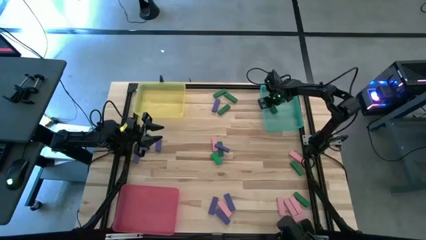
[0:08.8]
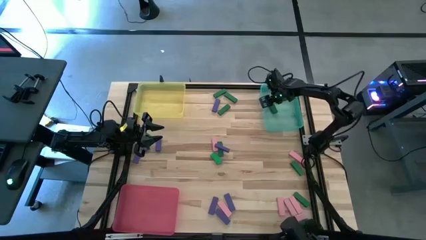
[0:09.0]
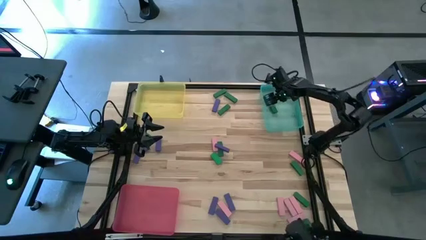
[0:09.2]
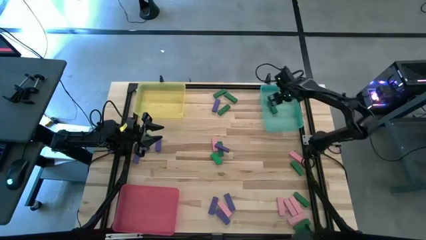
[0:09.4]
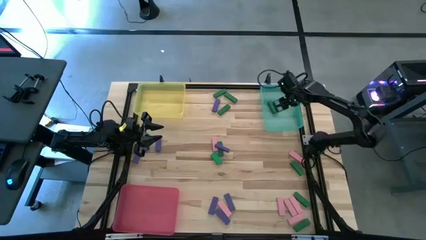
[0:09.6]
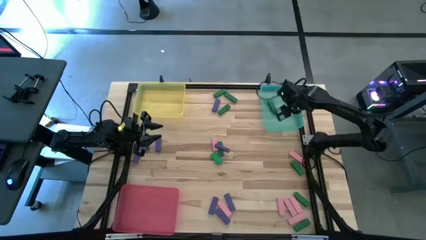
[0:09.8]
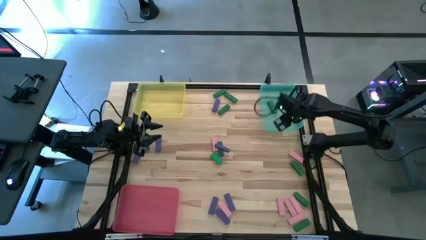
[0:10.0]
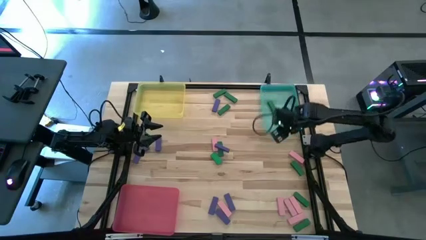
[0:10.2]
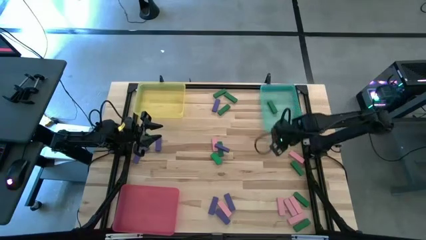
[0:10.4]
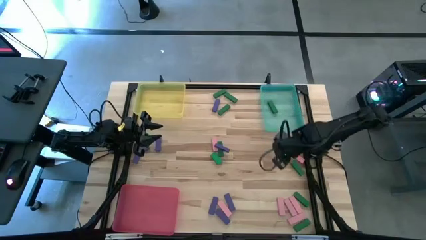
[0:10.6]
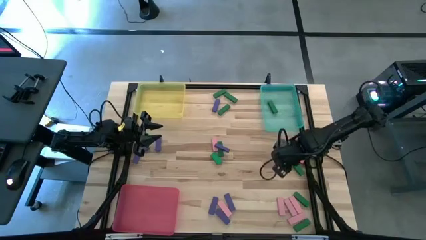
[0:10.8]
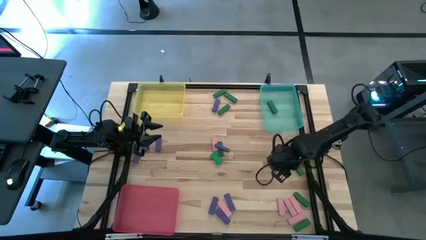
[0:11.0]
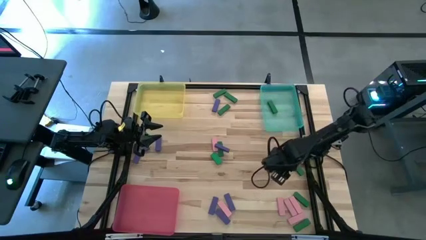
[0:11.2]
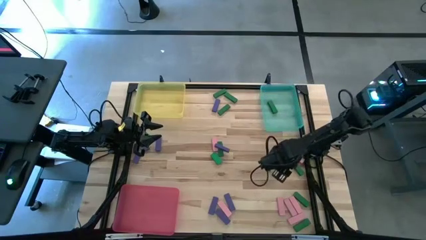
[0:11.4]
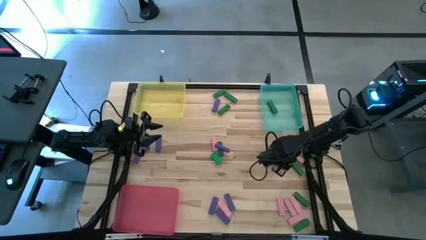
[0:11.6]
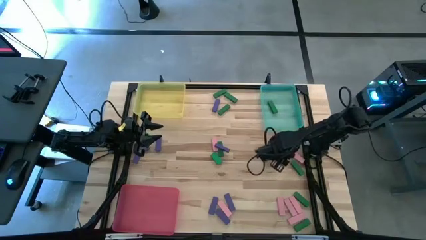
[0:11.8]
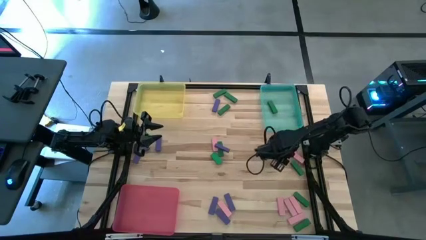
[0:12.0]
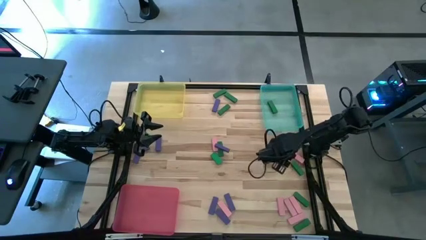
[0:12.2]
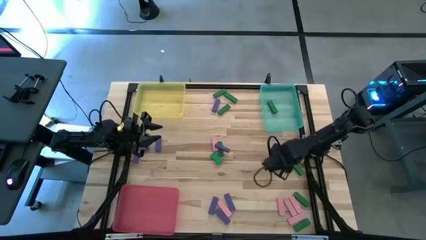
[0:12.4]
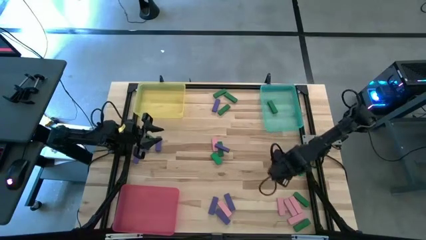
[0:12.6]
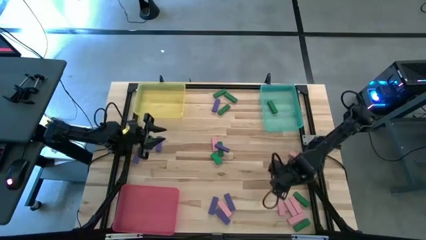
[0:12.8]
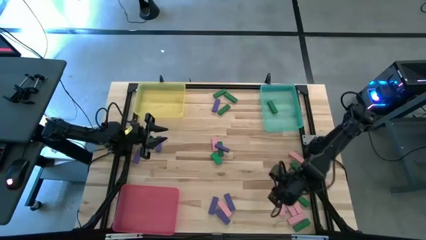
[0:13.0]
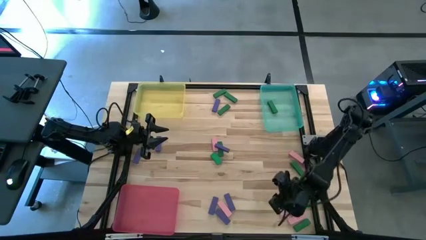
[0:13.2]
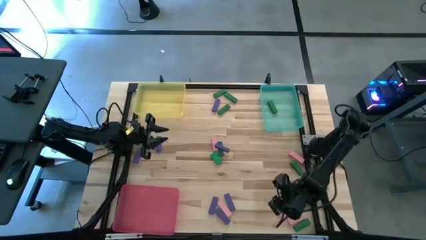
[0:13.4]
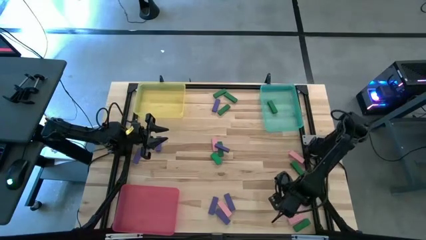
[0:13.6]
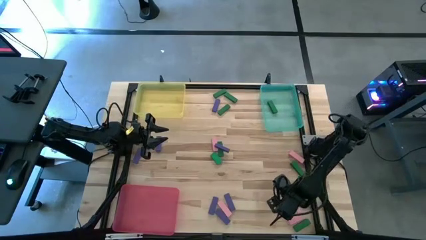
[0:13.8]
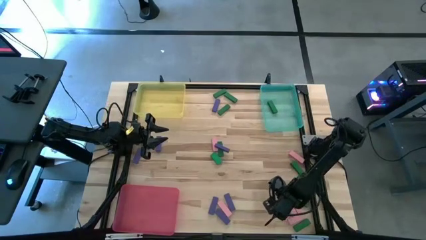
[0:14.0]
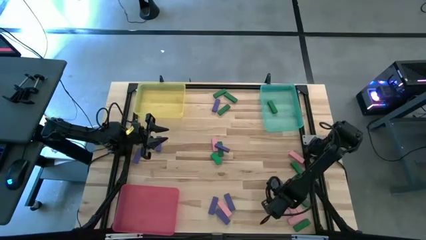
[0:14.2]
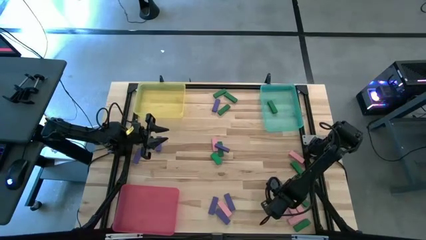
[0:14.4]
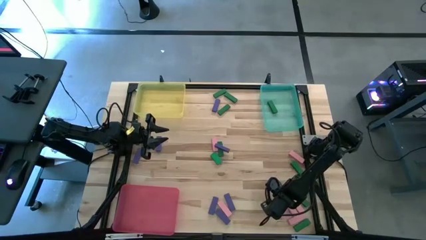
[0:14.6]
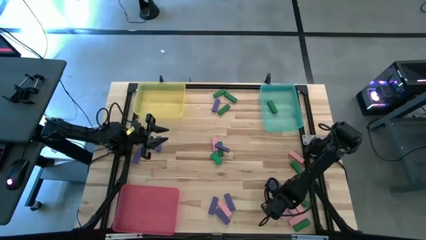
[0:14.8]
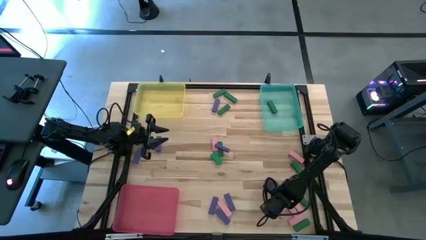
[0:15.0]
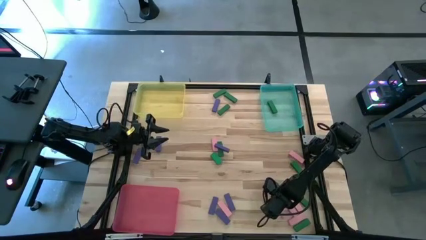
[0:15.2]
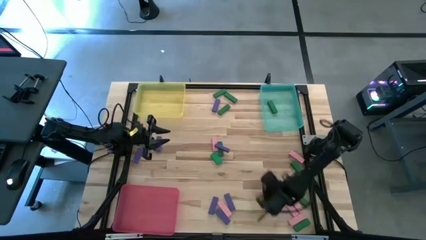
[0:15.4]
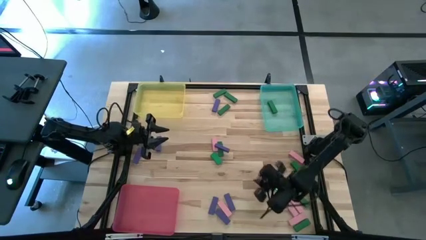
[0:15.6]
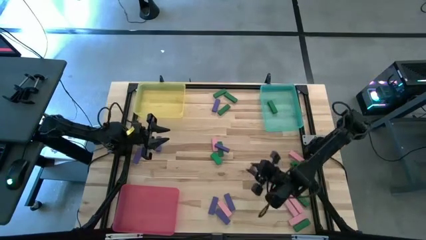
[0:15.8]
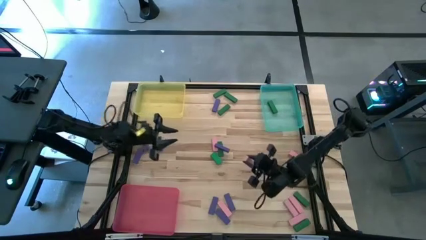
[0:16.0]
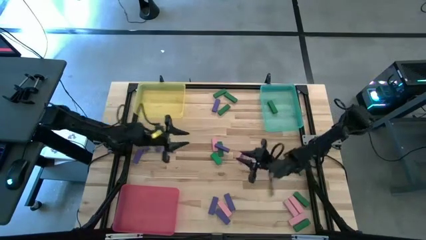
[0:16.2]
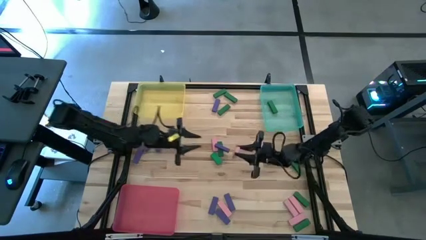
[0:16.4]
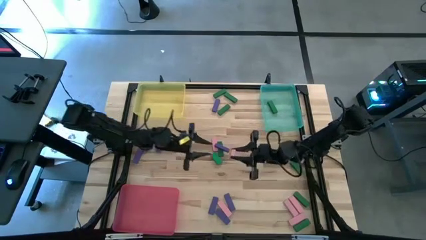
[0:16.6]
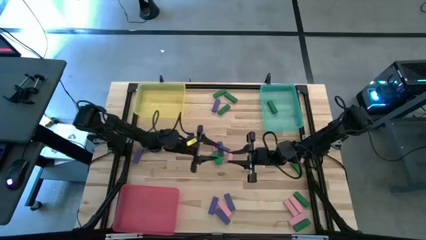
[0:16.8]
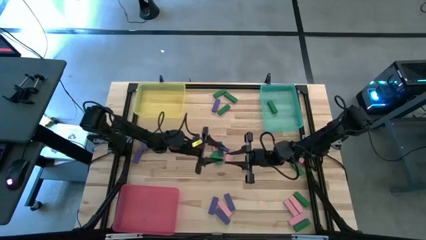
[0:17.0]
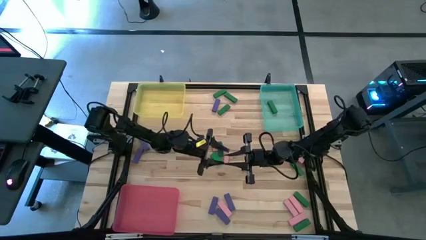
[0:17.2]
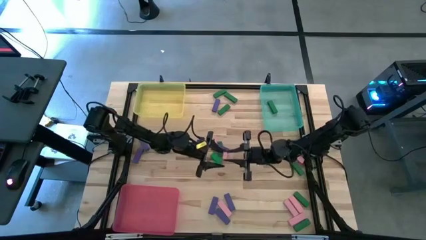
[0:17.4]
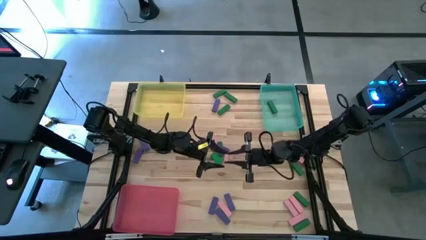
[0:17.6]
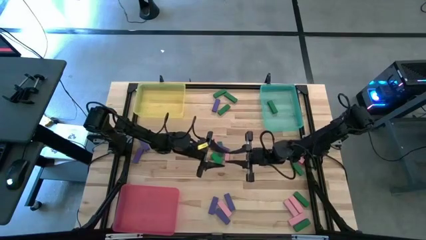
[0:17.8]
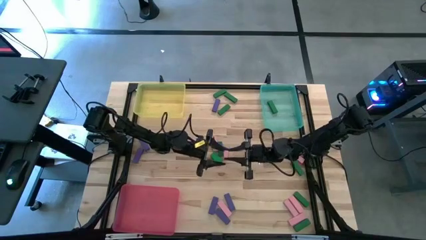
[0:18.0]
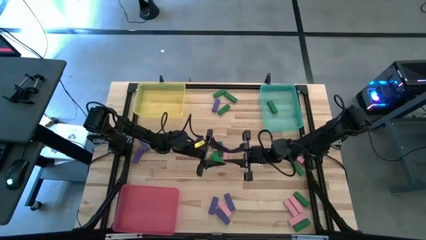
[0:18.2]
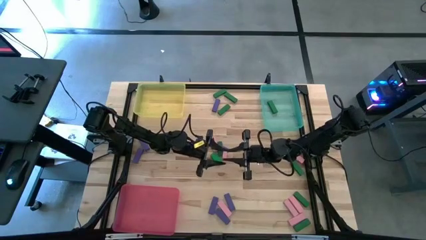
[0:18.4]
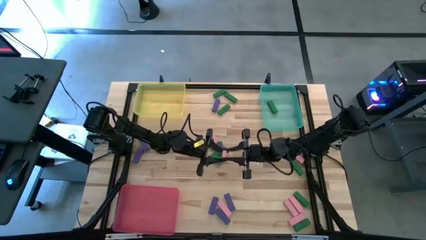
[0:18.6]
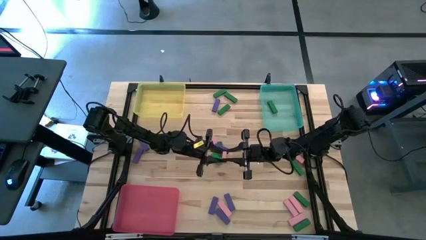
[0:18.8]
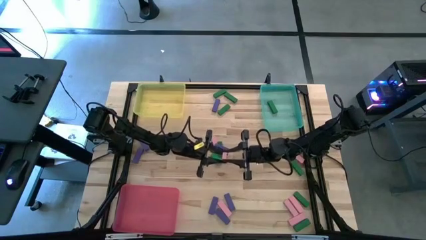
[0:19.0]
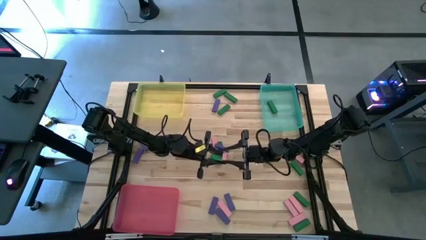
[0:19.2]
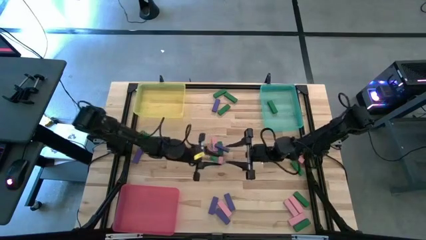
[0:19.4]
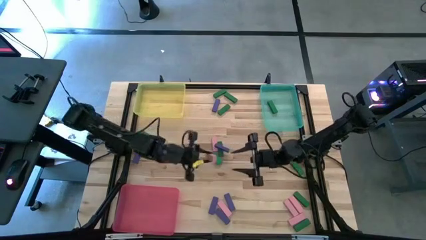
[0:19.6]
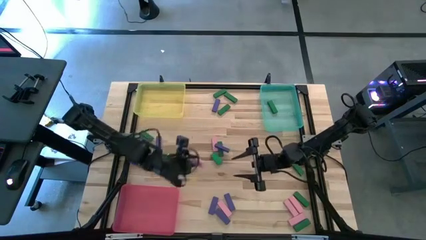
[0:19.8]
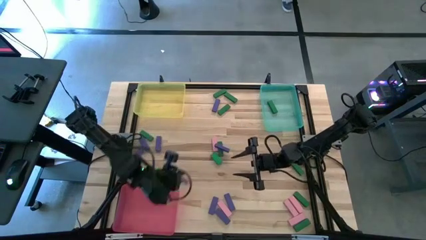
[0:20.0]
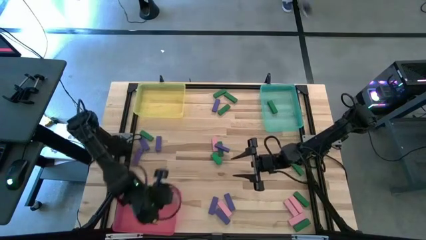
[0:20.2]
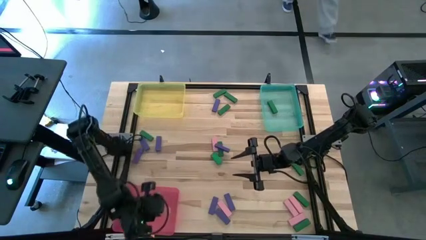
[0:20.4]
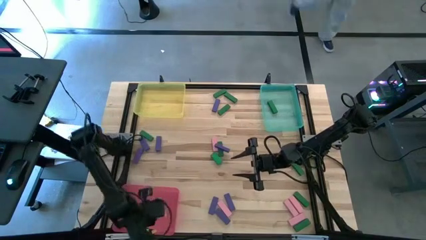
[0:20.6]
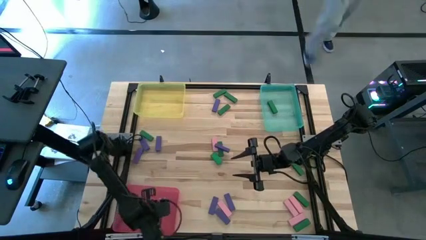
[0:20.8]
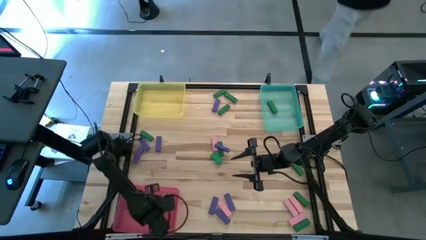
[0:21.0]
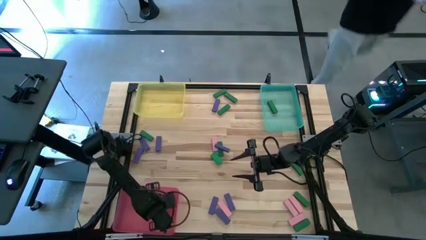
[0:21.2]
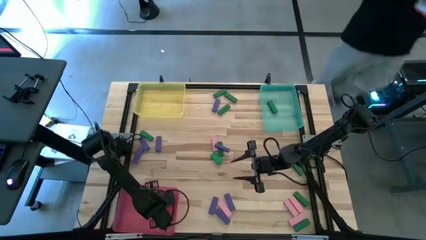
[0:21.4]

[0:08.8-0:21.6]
Task: Sort blocks
Put the pink wooden block into the pink bin

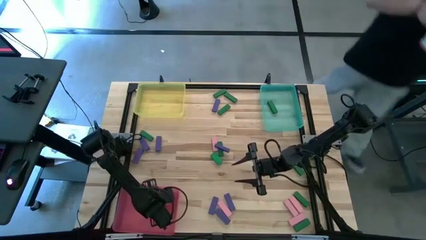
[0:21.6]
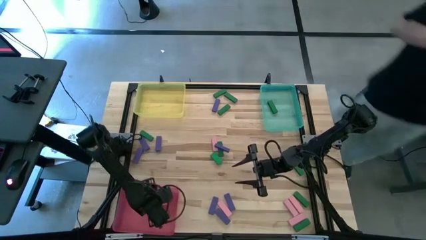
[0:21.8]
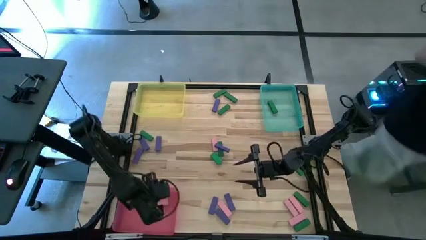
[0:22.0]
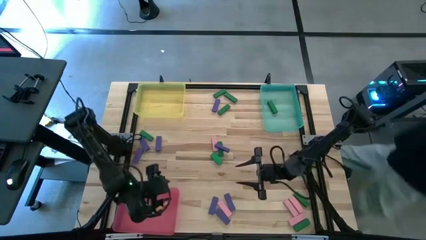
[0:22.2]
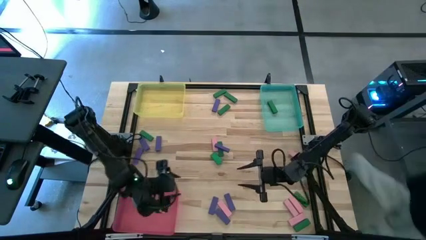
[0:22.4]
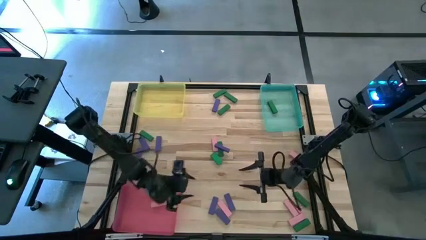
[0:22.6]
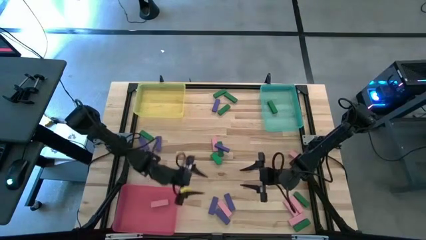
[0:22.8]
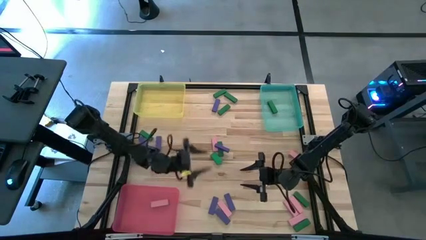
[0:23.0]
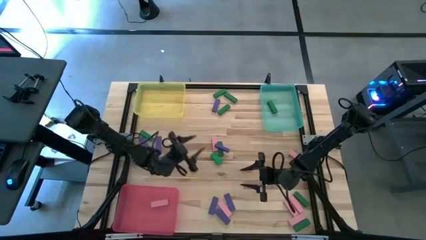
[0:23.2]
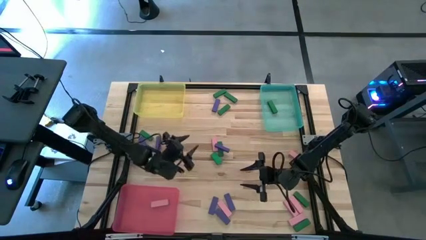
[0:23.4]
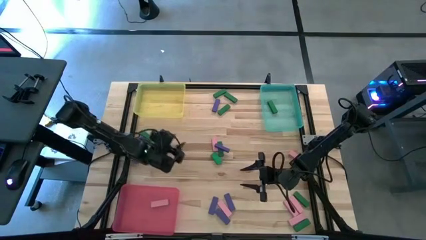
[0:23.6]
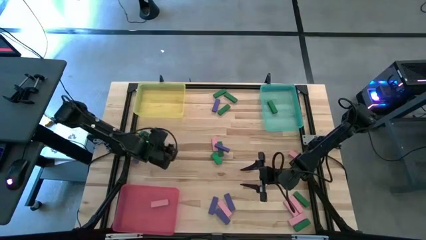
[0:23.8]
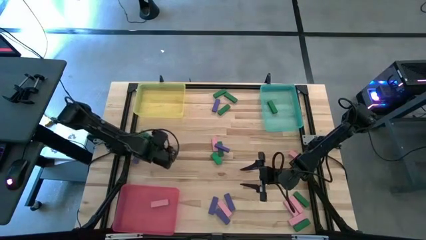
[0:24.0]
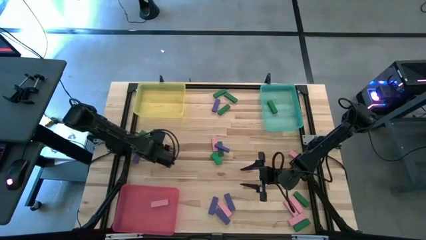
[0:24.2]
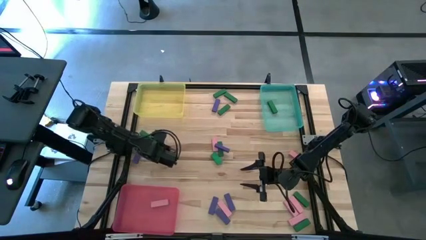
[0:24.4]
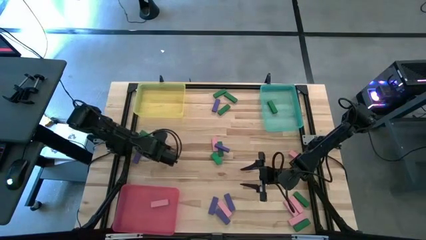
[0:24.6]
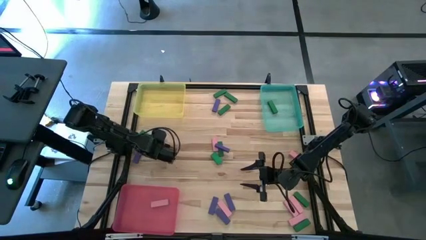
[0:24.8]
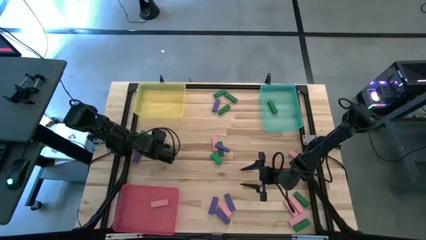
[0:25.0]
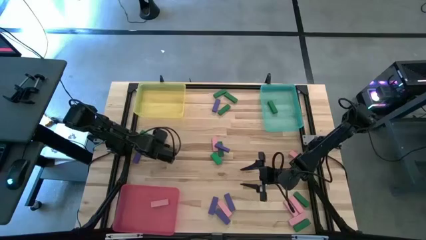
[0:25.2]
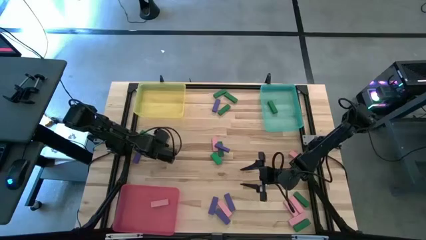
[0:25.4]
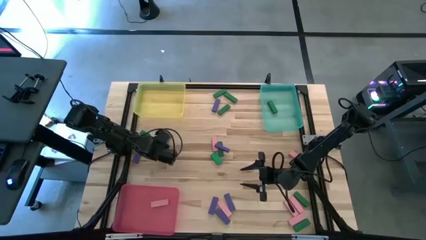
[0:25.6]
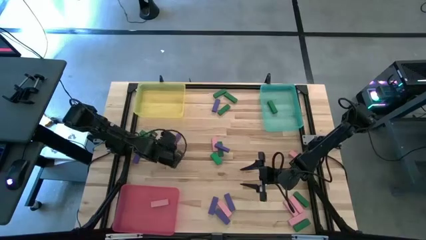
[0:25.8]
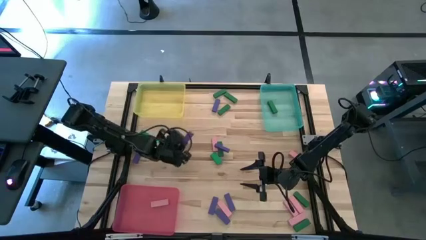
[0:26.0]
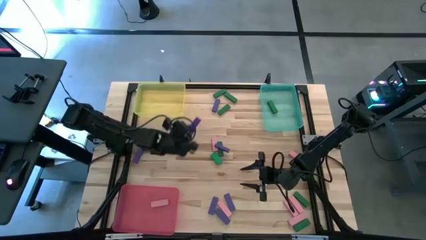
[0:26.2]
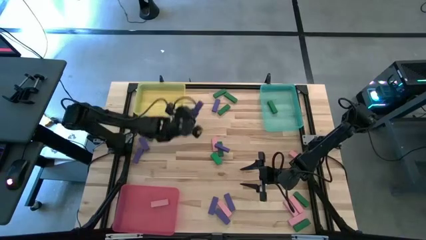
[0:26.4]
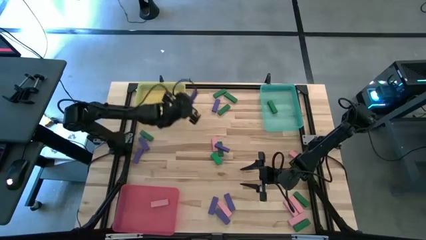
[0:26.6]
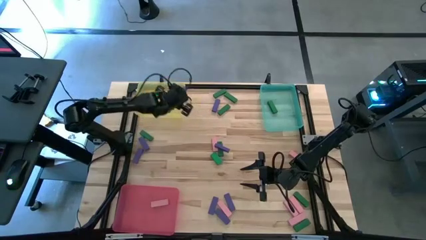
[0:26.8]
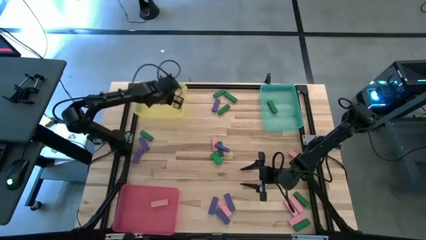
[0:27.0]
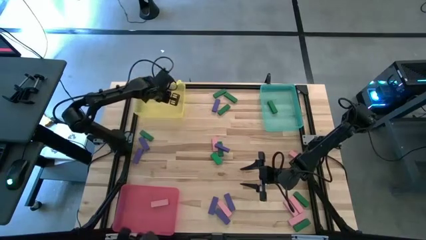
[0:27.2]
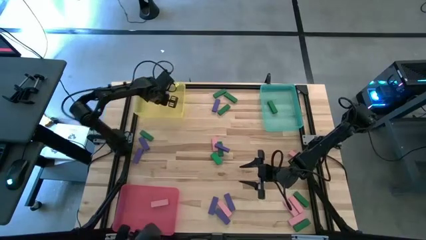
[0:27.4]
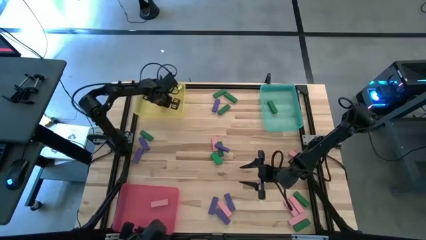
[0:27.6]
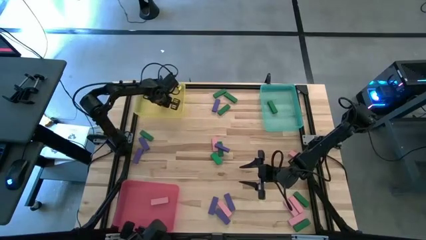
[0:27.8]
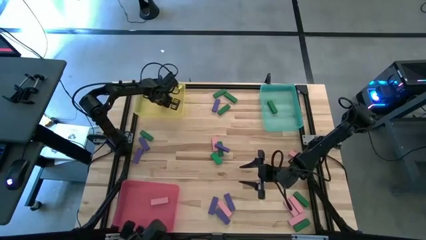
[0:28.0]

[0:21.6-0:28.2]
Put the purple wooden block into the yellow bin
